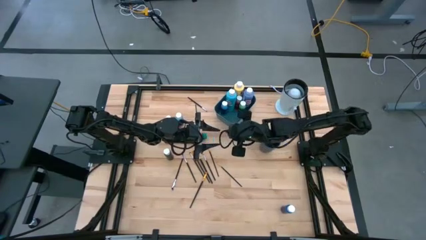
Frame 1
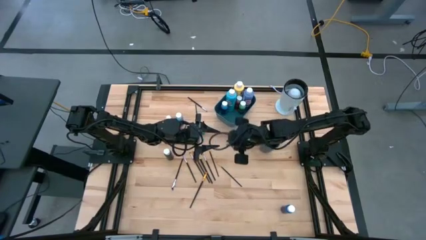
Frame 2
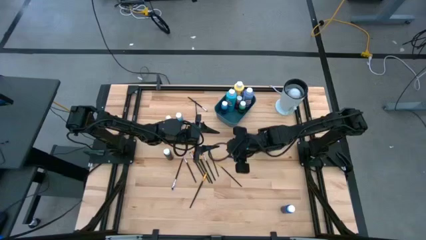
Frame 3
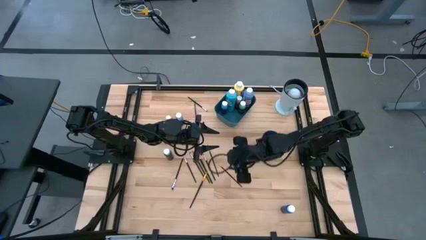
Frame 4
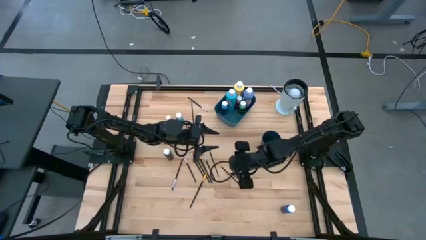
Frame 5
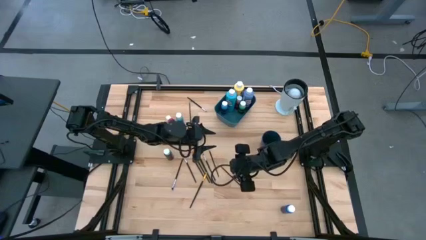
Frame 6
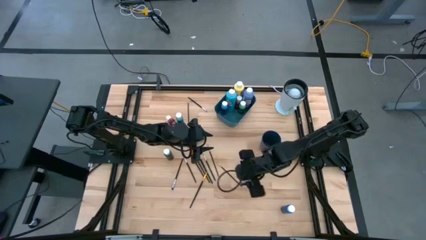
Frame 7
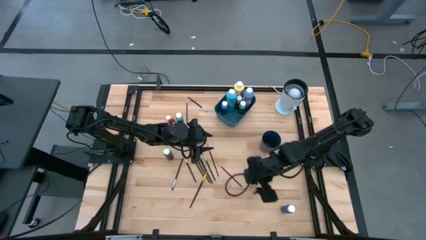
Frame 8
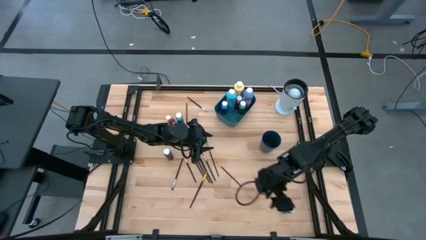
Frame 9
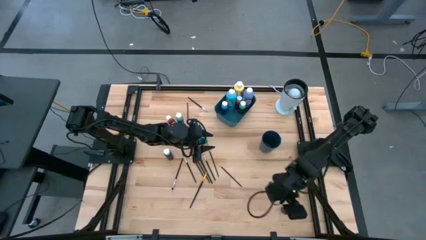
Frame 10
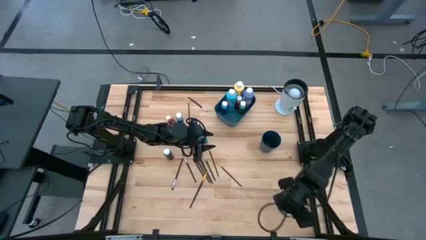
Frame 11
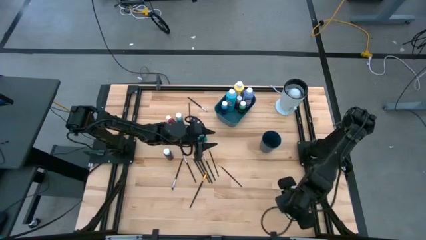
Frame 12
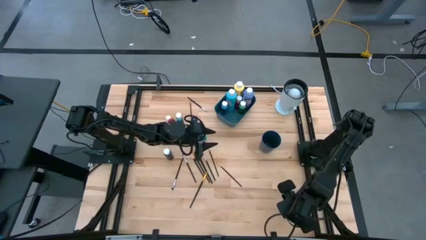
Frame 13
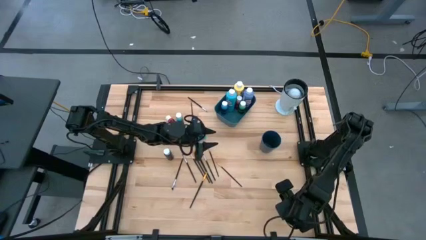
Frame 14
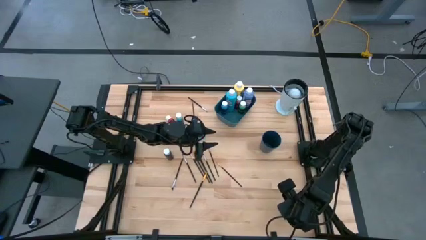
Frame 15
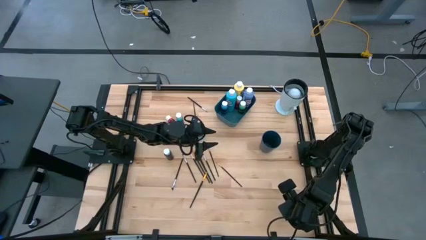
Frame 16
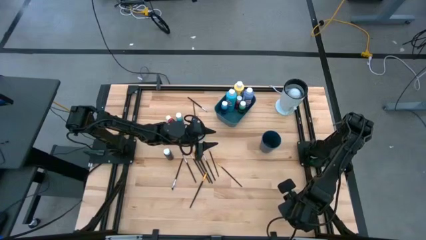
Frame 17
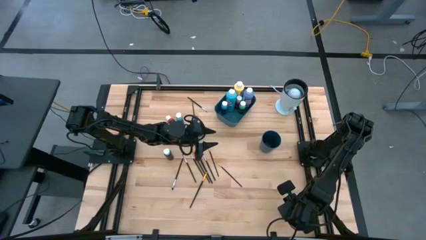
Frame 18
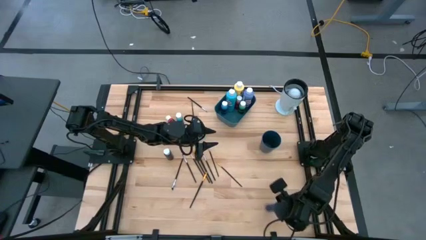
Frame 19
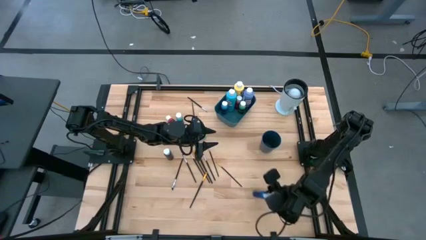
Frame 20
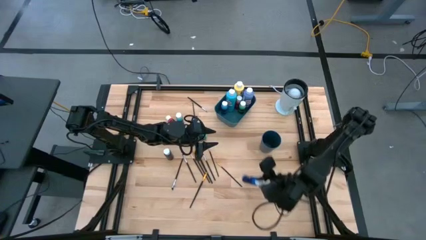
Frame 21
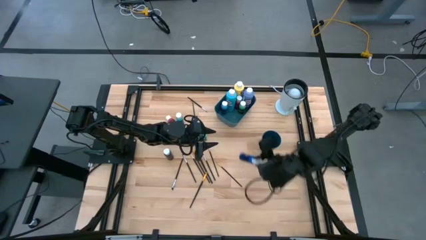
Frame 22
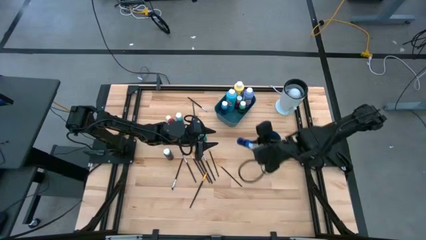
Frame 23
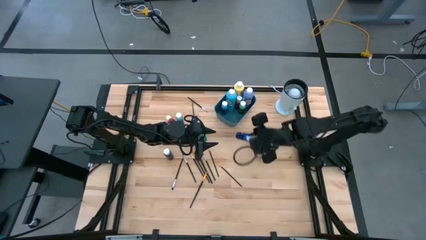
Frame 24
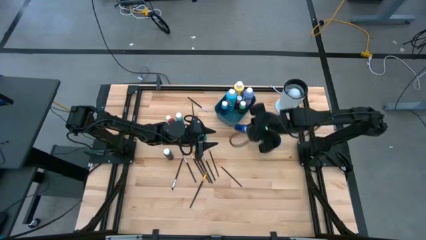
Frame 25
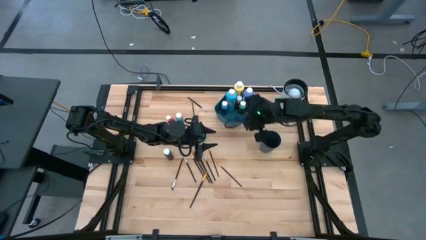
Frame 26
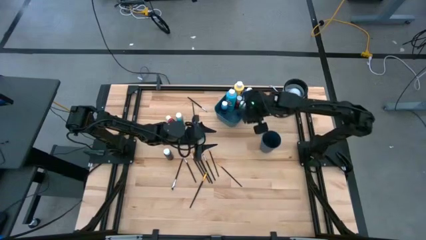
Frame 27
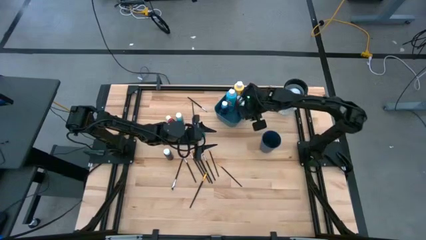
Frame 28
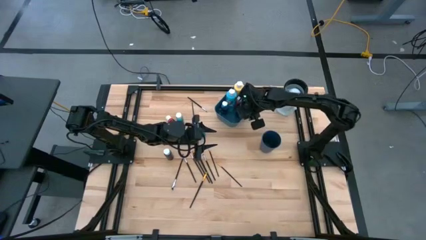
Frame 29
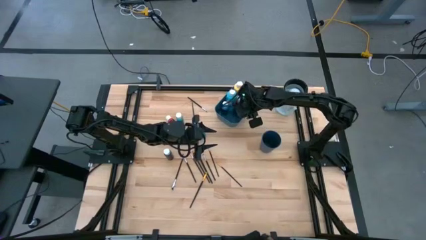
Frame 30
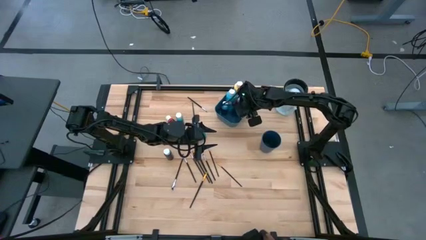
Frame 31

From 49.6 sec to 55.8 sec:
Task: Pick & Place Paint Supplies
Put the dark blue paint bottle into the blue bin

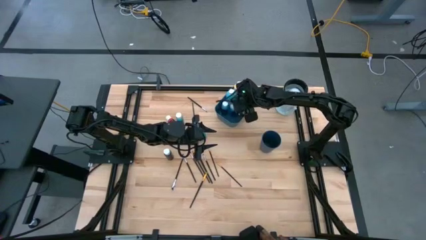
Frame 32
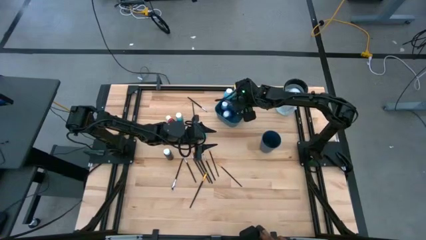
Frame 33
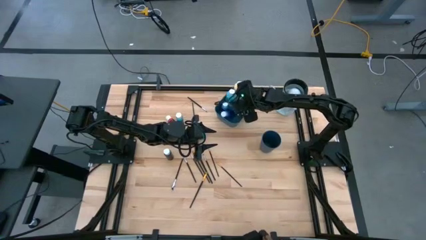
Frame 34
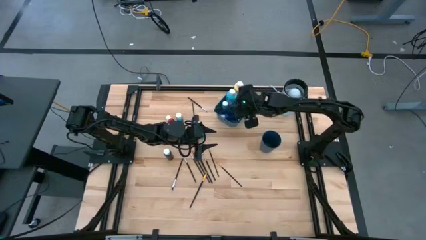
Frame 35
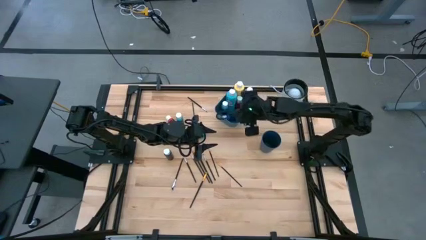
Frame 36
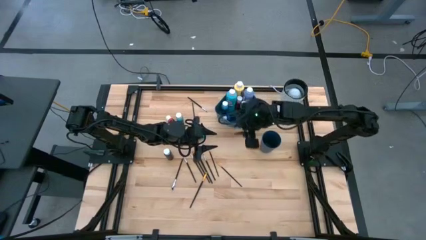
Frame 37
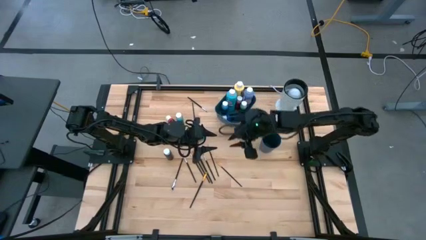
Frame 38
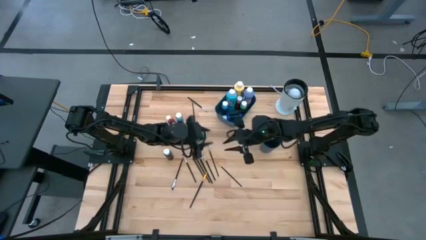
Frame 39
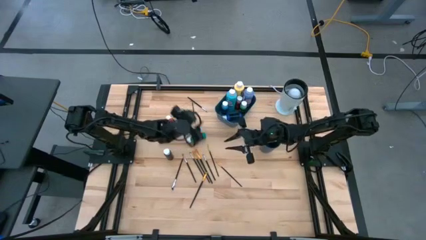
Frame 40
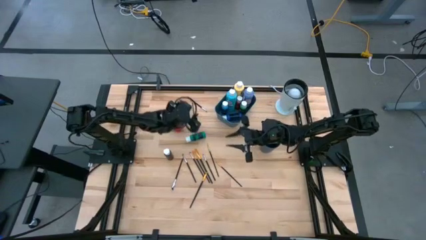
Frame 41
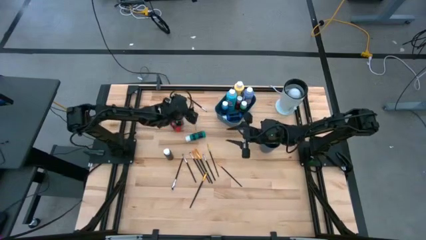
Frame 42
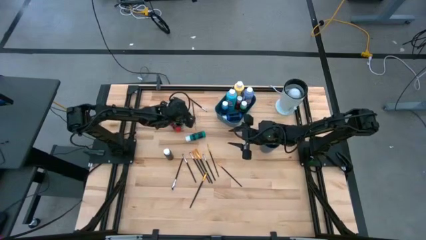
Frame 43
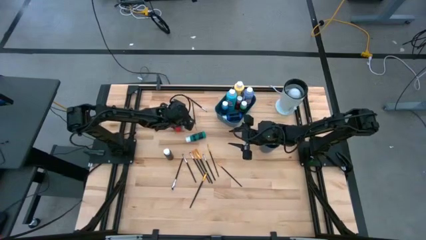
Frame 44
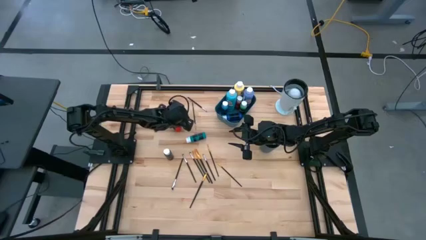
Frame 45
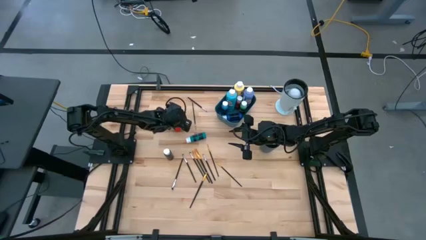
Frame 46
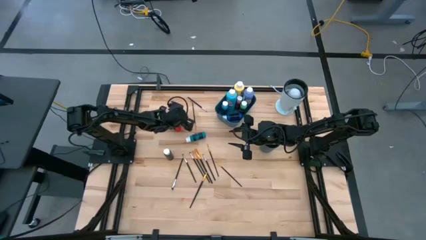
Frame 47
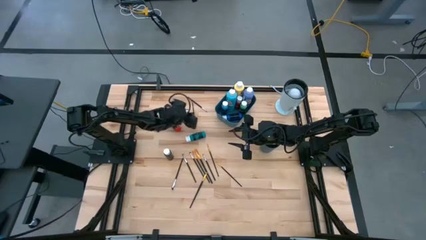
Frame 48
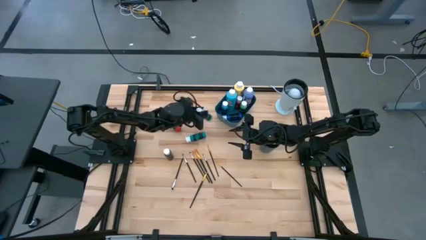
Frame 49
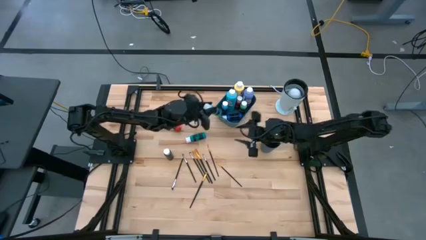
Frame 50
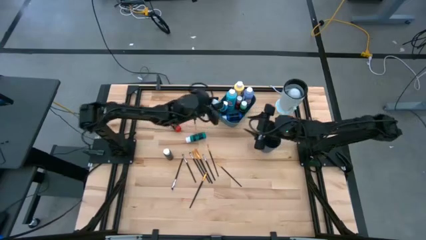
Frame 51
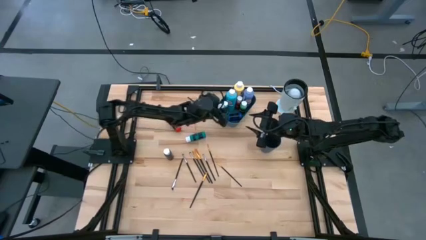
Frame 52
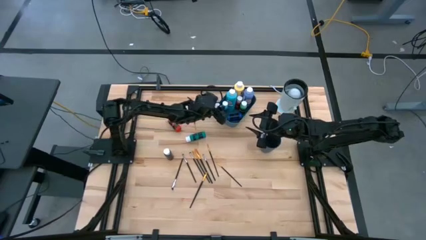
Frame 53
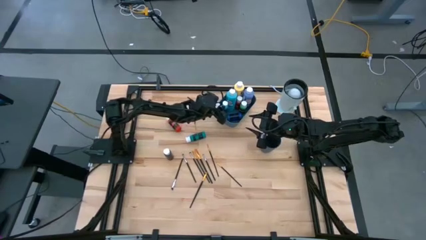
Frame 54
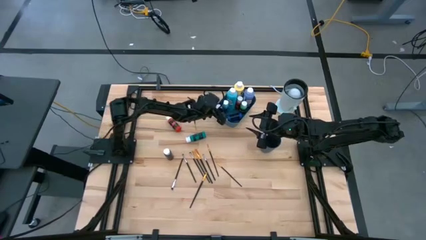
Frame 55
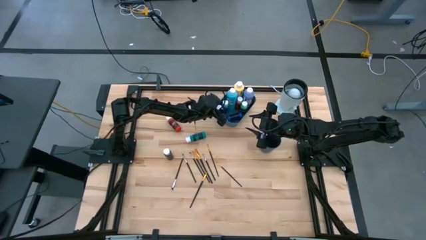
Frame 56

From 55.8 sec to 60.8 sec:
Put the light blue paint bottle into the blue bin

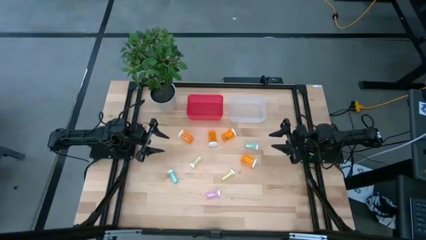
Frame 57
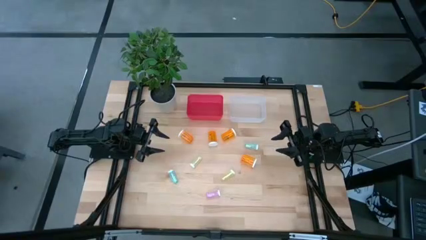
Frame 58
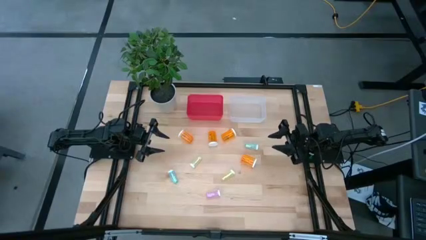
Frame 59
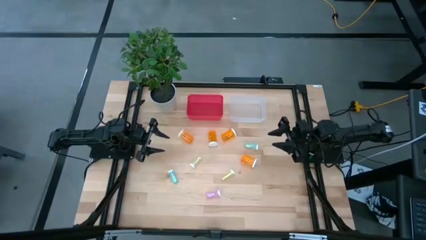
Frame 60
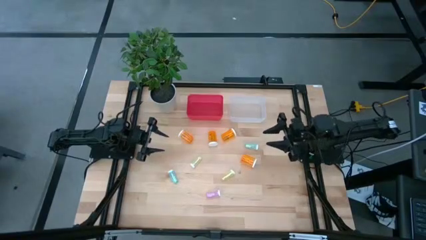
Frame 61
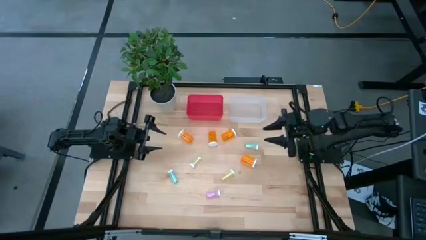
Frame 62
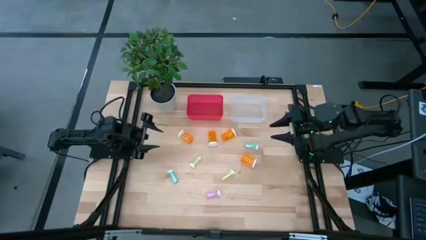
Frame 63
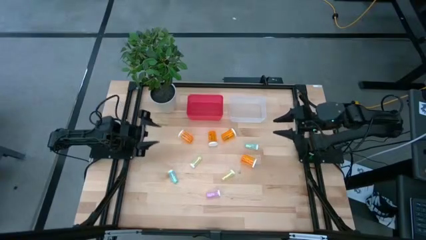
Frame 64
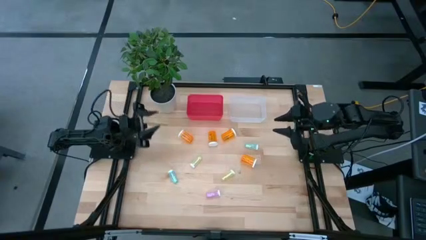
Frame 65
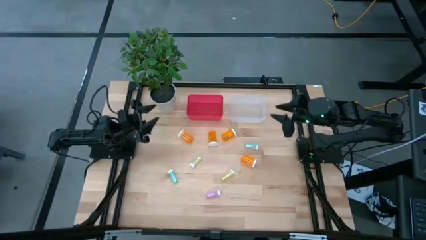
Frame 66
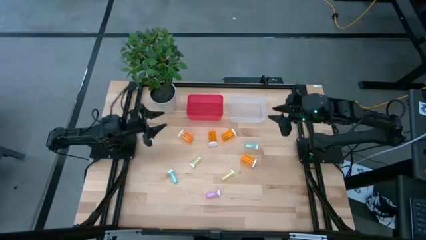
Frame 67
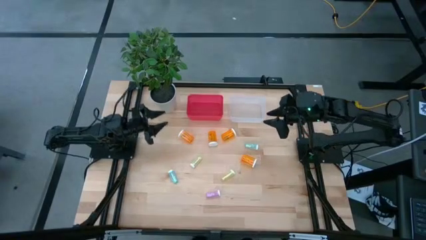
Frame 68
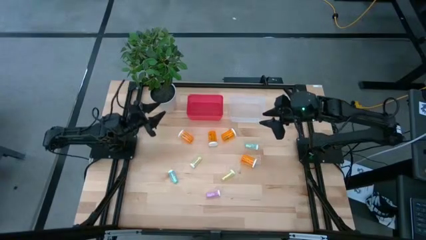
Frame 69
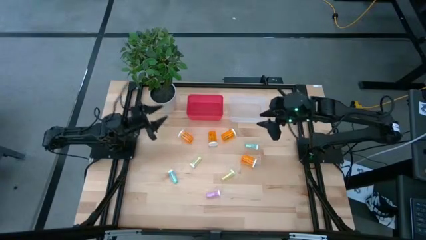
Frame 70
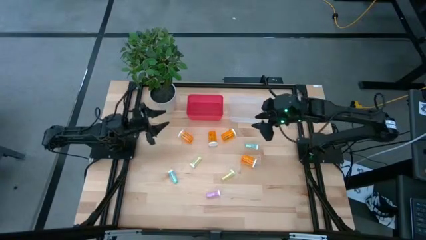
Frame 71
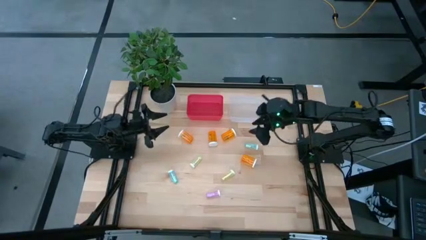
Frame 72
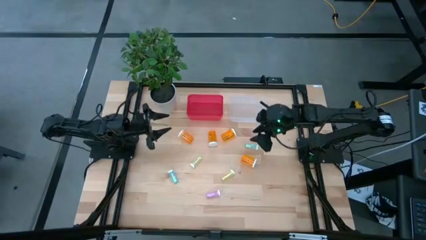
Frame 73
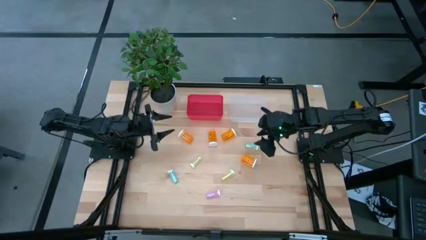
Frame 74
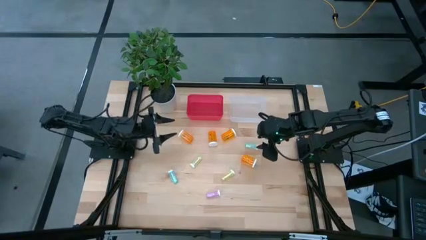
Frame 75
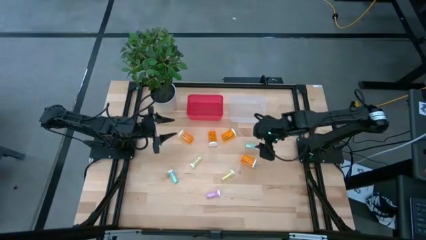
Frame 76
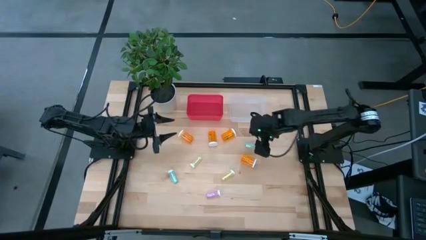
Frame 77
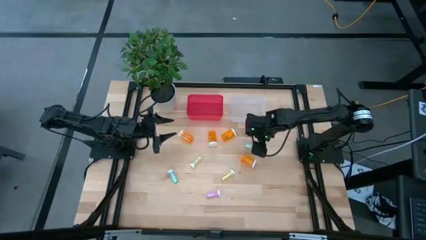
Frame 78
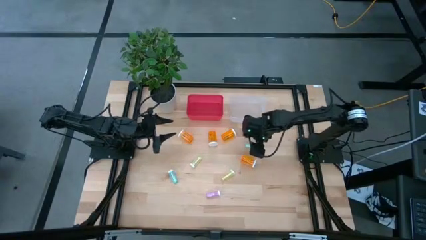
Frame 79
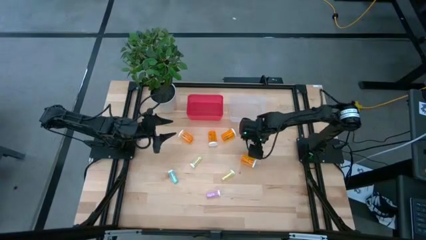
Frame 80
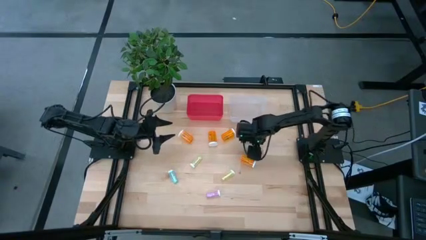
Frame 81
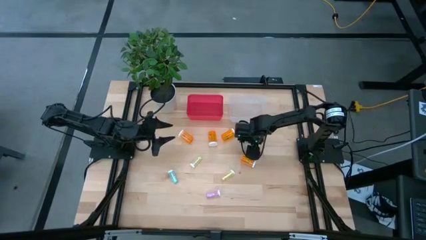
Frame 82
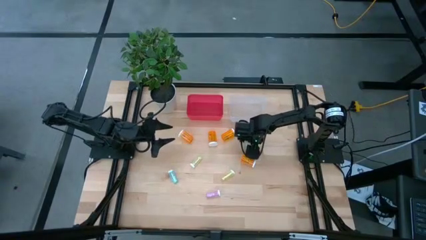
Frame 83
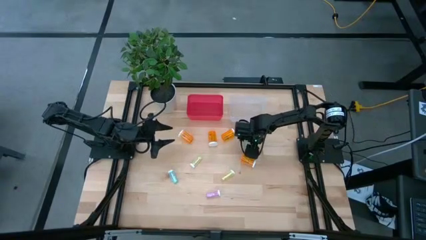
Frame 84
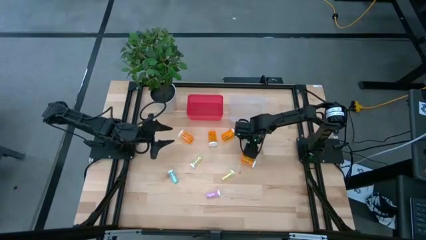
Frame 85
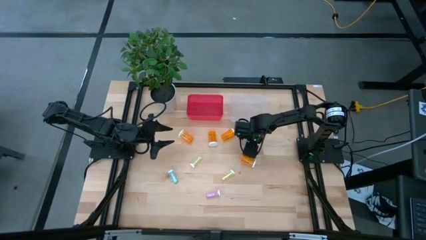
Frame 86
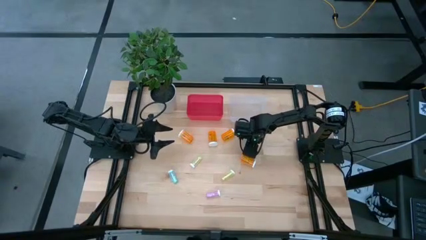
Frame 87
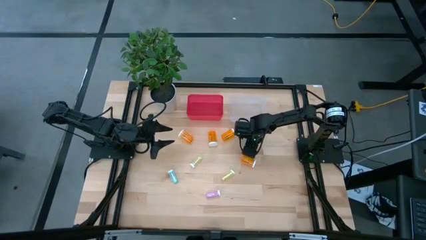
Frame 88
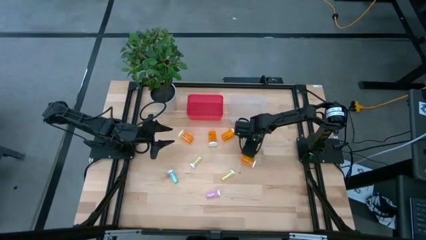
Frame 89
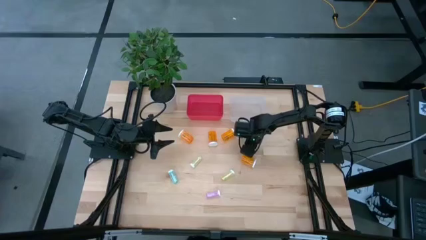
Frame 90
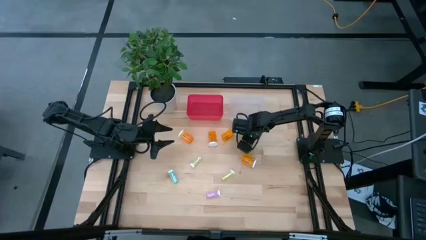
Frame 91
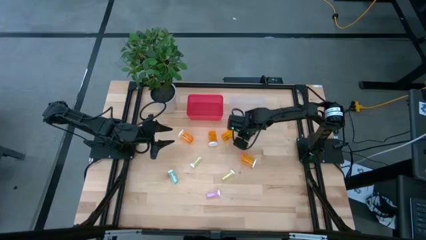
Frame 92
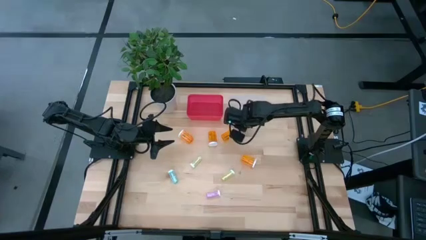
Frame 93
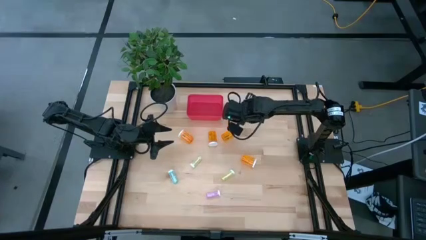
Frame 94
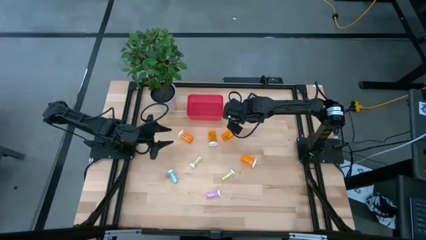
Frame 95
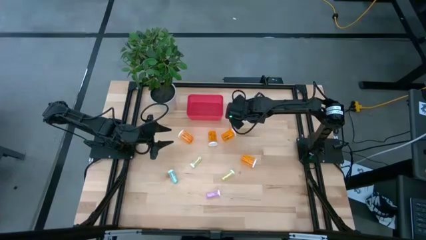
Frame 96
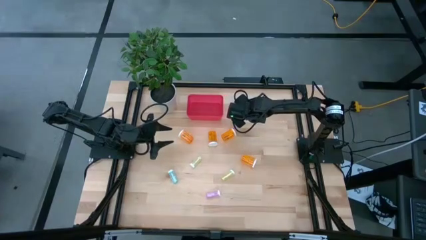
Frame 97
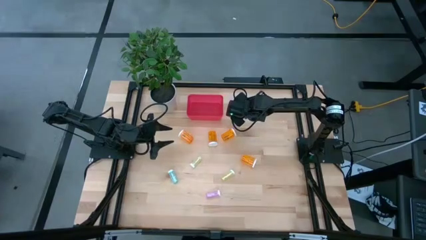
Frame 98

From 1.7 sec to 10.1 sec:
Task: Pick and place medicine bottles into bin by pill shape (circle, oval)
Put the right blue tablet bottle into the transparent bin
